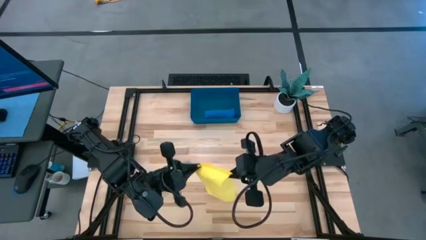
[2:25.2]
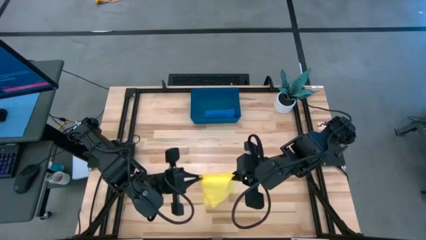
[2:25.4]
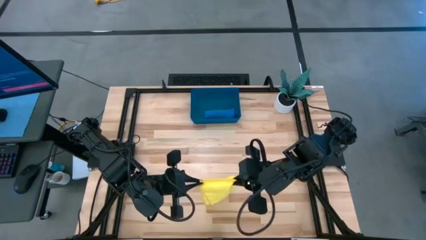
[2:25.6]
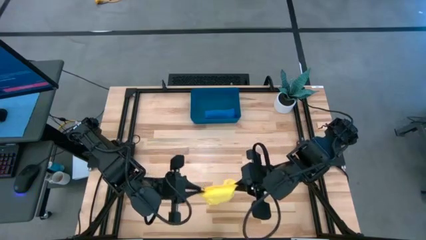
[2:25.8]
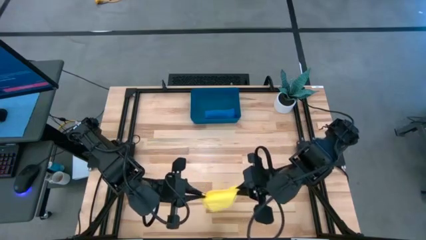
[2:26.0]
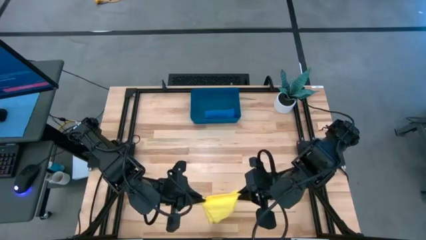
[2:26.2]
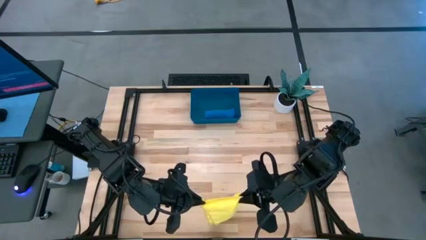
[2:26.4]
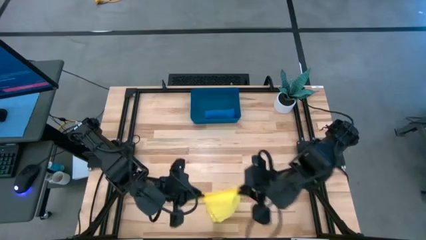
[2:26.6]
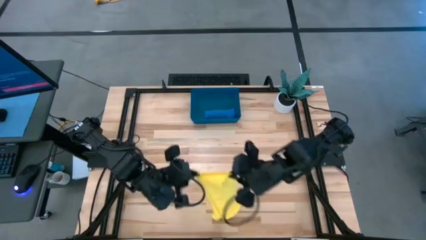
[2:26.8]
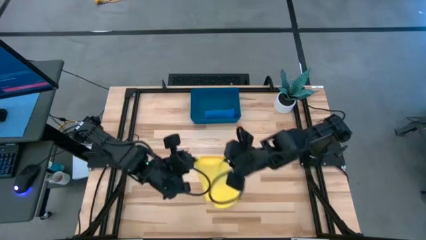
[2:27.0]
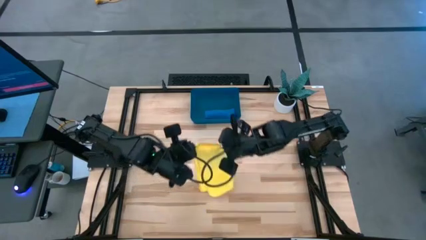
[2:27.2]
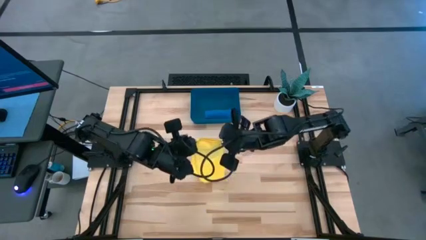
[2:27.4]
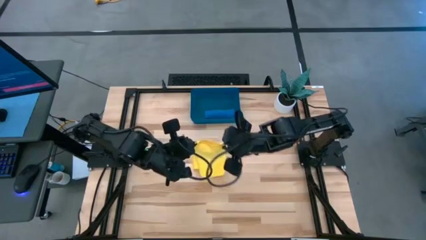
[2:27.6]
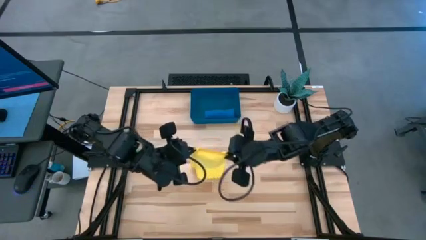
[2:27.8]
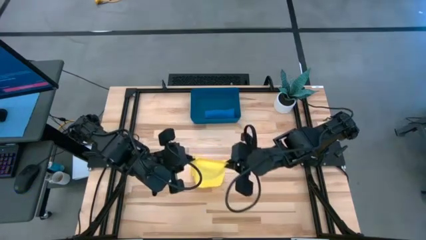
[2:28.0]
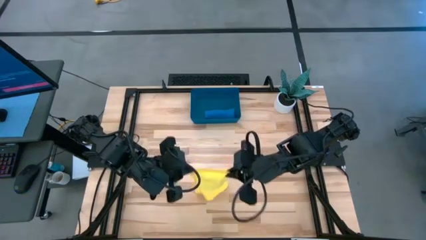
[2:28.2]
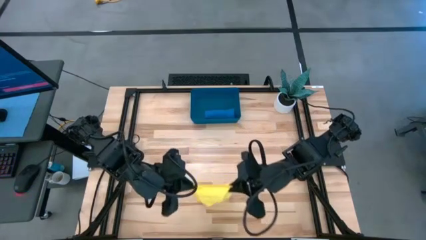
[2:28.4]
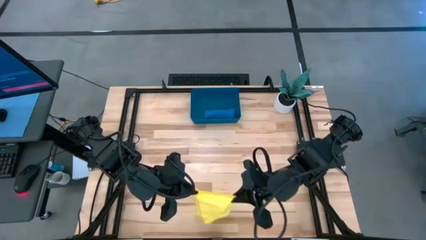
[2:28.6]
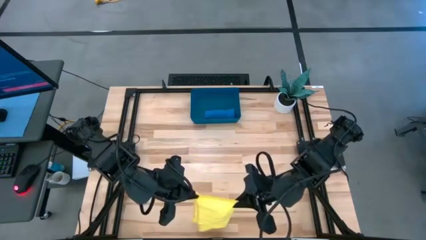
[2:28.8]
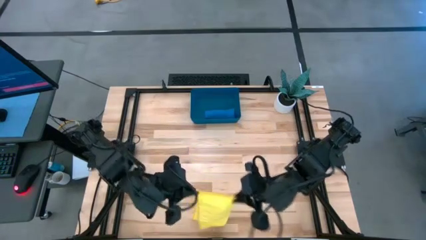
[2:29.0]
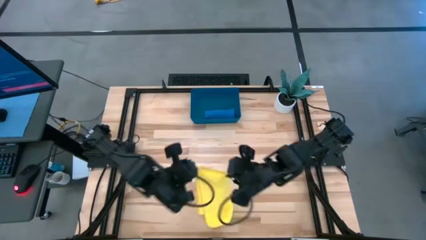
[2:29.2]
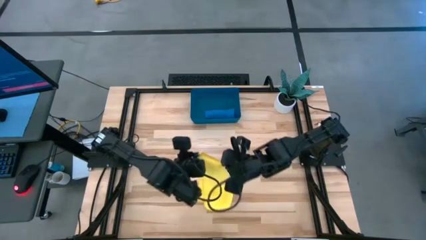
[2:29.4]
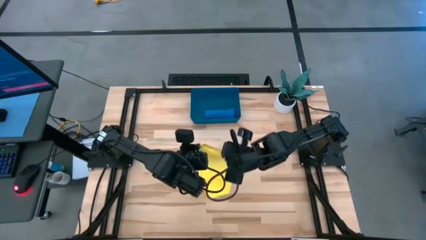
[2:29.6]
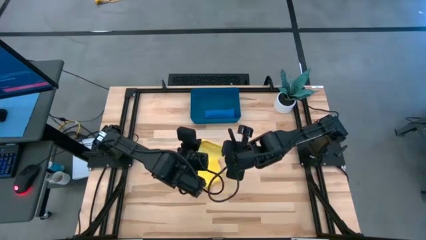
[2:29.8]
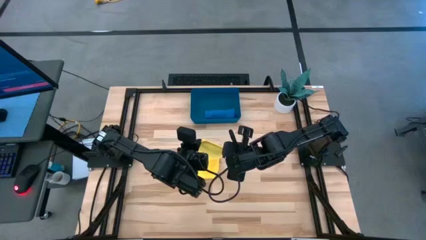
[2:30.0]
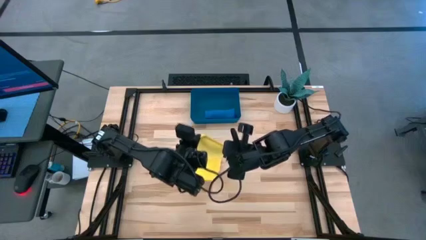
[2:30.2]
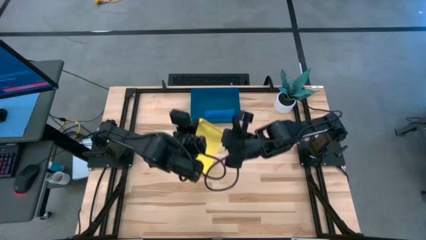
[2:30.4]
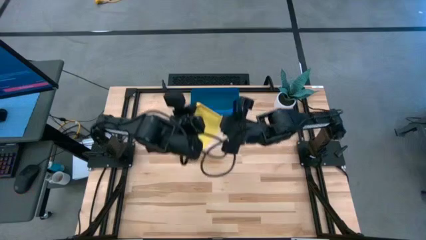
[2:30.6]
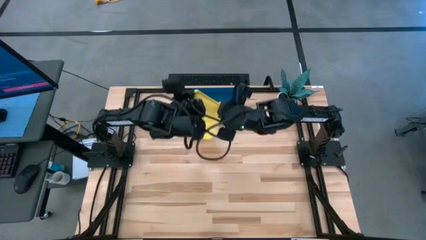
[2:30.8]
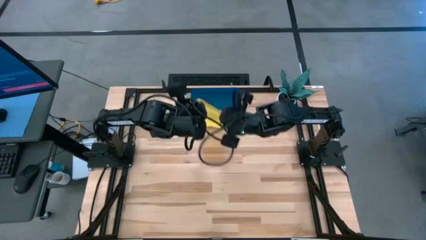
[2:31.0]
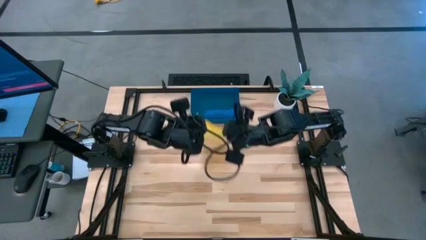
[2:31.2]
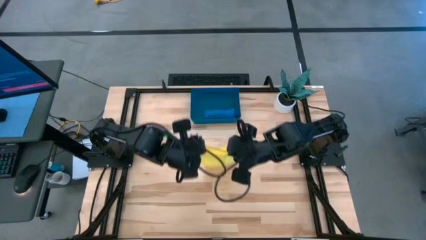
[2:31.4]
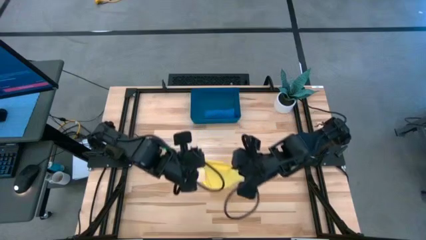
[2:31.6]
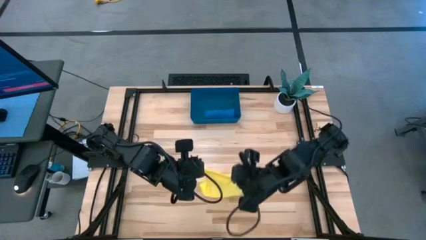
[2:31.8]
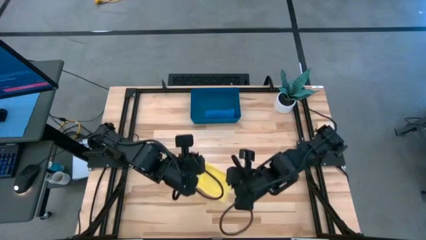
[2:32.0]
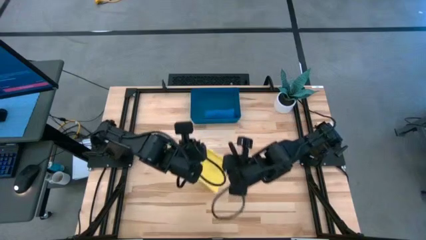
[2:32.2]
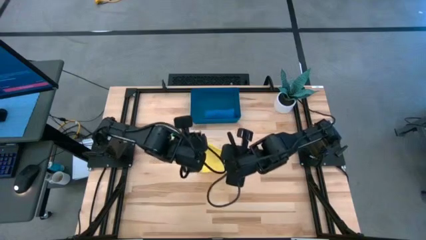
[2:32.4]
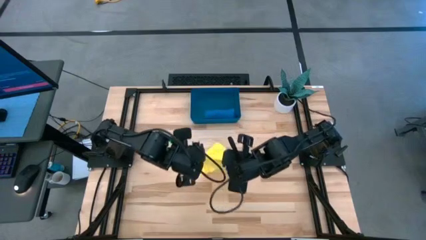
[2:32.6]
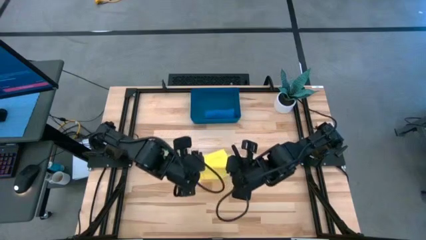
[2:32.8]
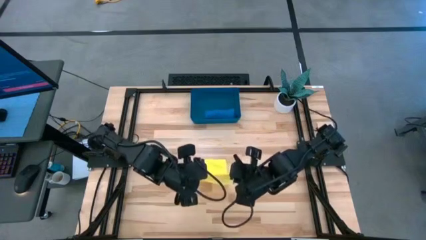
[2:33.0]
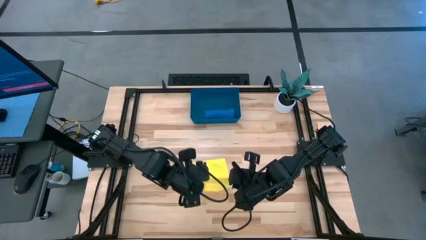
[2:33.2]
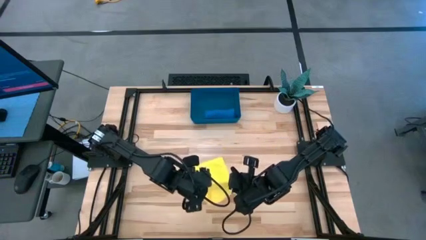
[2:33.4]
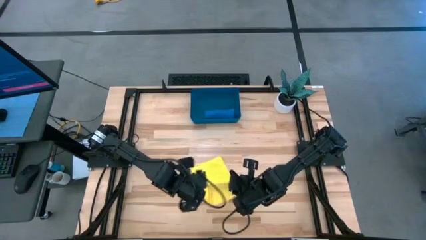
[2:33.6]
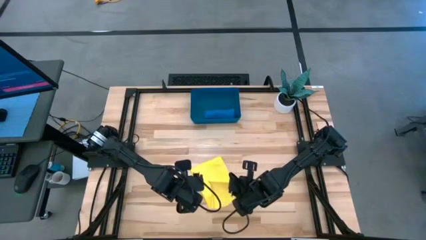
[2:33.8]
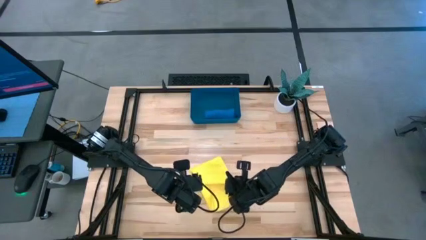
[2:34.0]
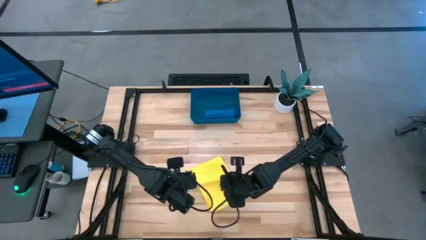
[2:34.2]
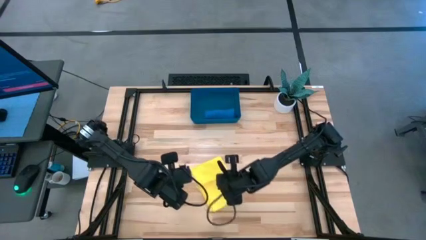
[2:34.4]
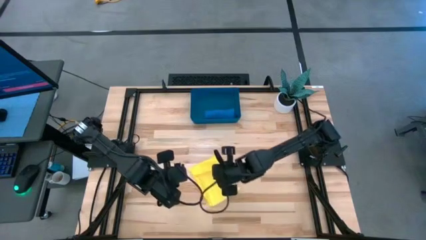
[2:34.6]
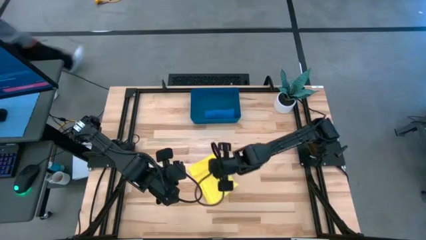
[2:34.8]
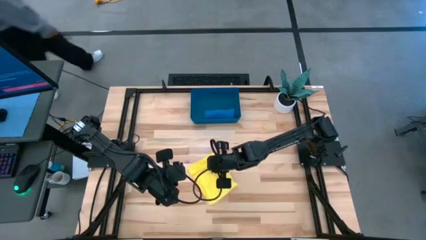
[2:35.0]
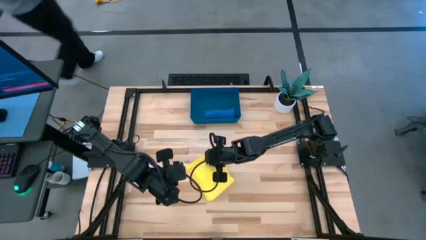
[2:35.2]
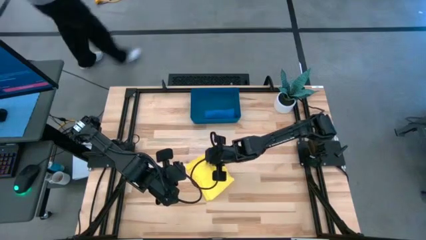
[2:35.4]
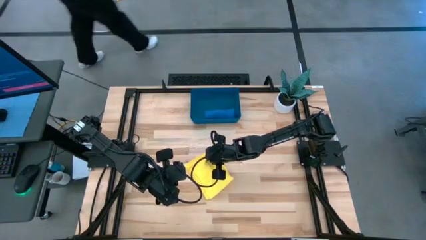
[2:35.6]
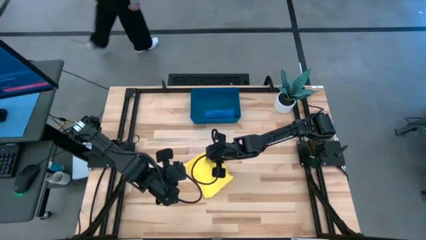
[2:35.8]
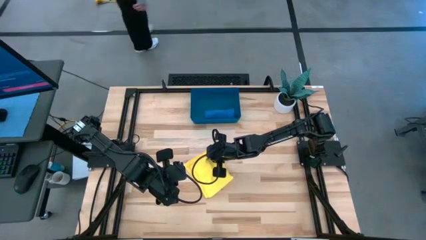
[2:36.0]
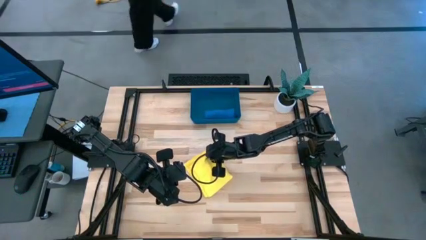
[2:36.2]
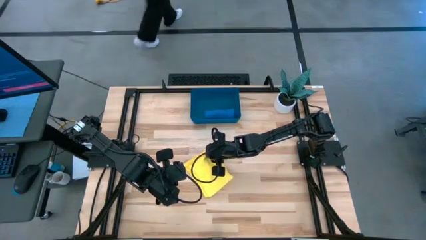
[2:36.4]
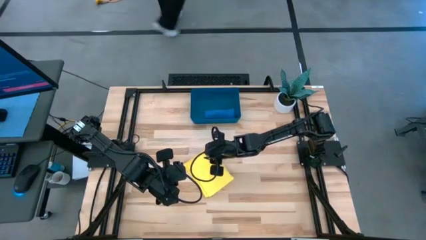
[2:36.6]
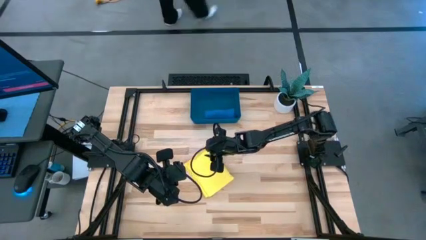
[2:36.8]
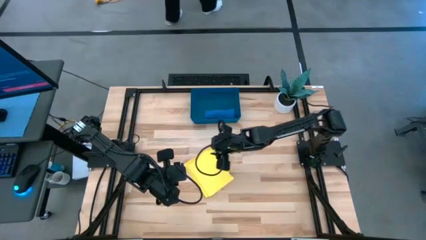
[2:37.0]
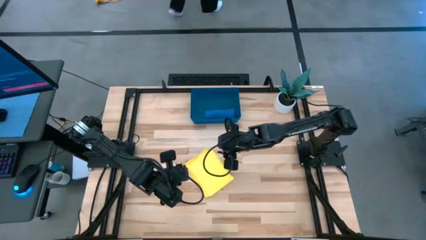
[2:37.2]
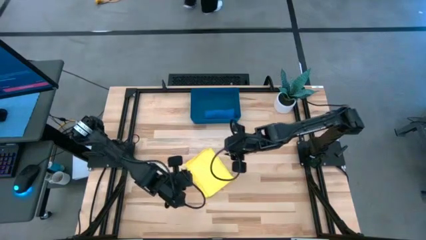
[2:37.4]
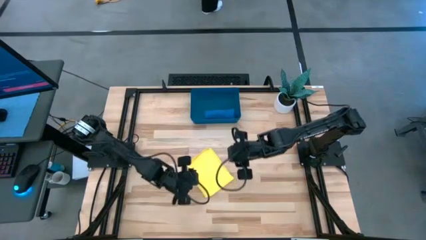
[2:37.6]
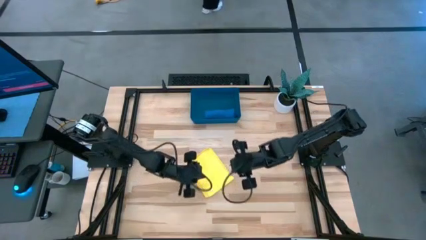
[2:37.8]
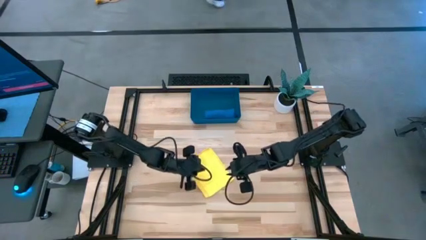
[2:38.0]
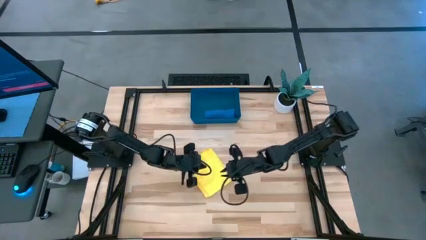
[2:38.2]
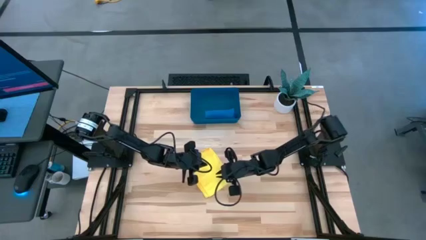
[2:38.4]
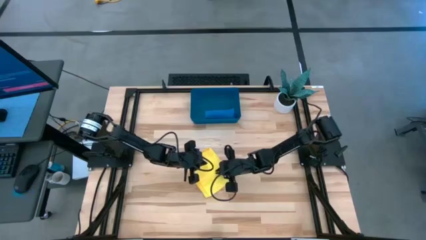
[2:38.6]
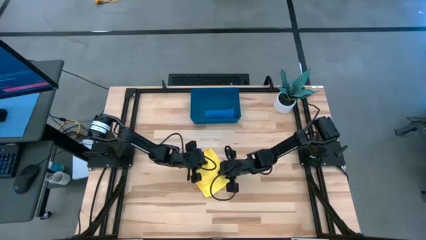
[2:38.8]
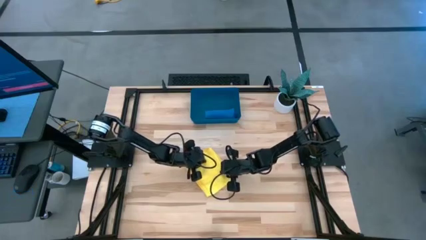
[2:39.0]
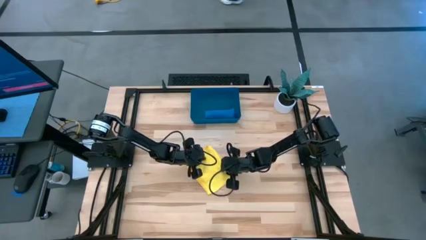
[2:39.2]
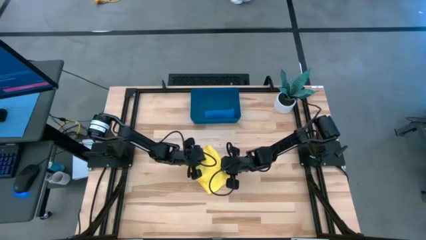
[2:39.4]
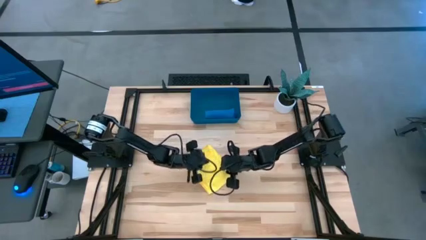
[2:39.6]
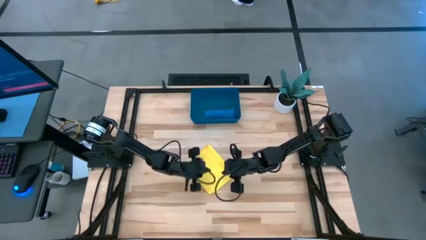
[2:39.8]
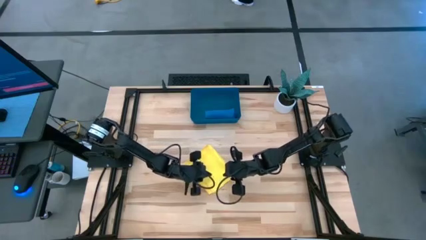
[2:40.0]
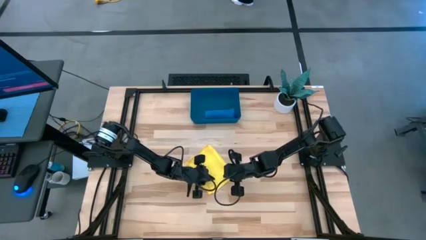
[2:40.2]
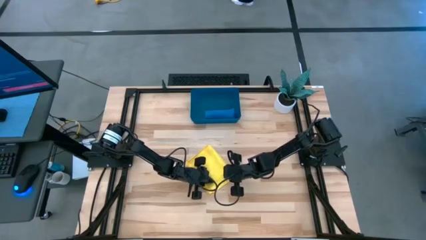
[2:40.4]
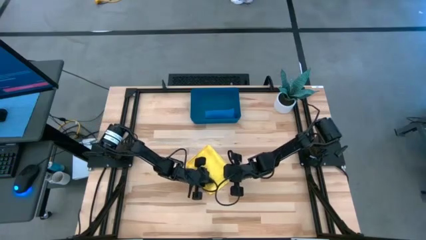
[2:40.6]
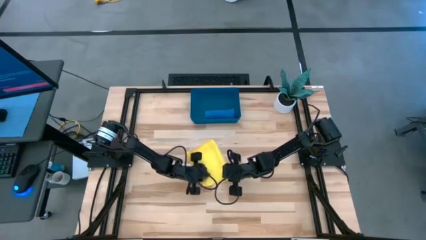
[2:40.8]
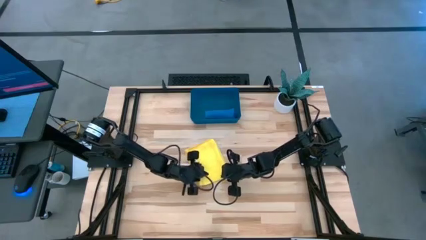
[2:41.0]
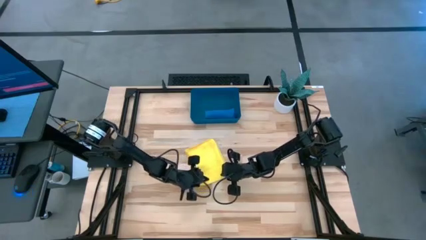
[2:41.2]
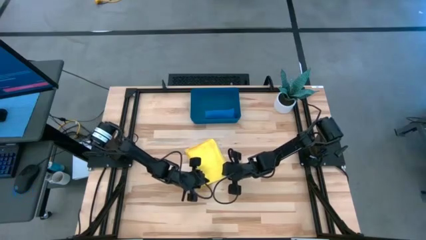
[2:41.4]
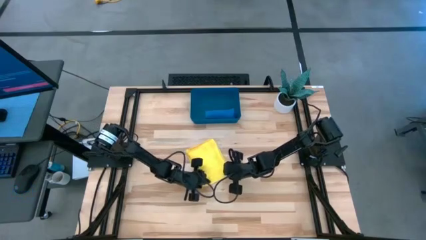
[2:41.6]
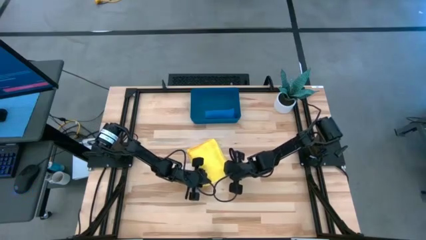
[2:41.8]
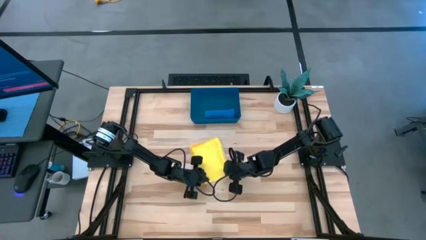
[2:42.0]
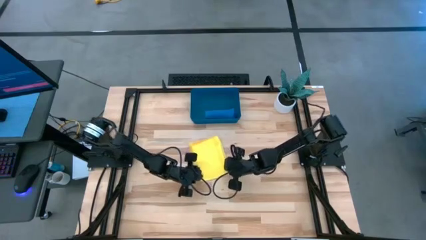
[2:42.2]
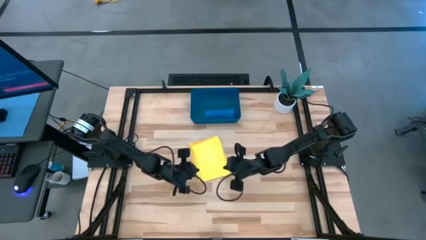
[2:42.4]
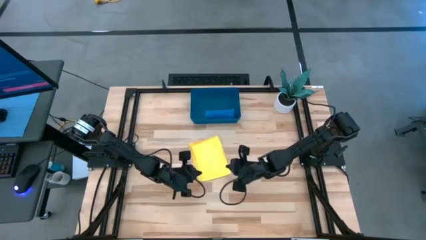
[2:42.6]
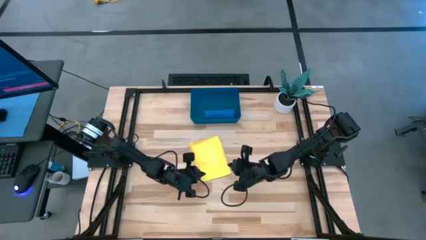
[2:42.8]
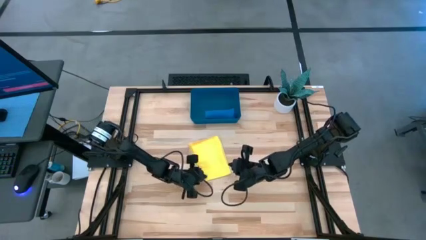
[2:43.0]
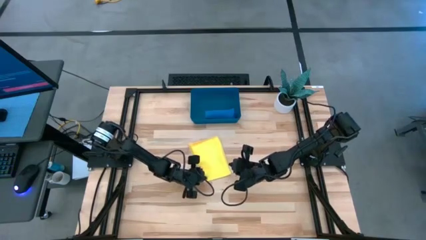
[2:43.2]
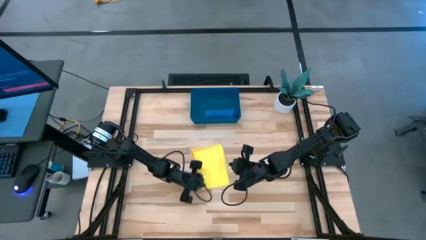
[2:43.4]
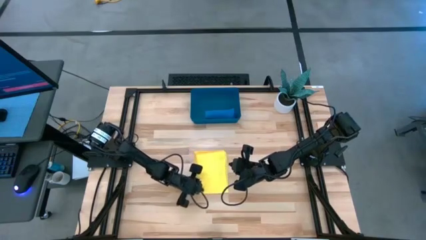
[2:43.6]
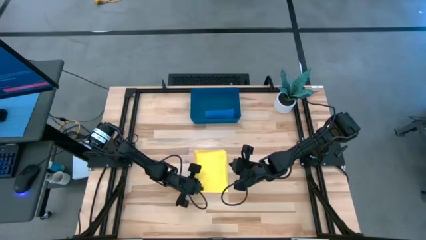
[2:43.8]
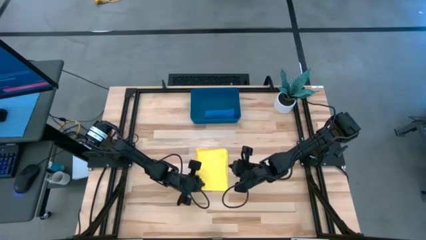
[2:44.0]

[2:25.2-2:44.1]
Task: Roll microfiber towels into tight, uniform cylinder then place into a basket
Fold the yellow towel
